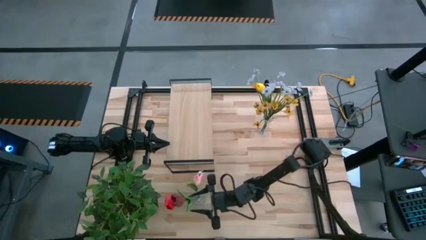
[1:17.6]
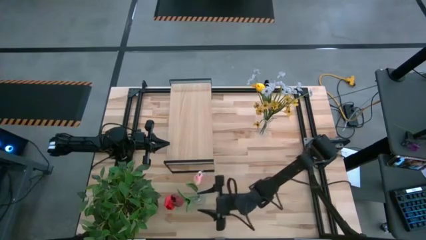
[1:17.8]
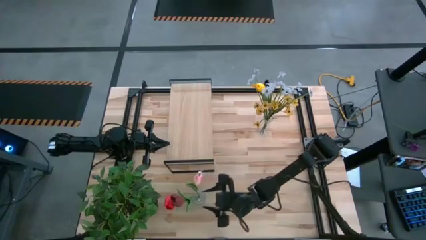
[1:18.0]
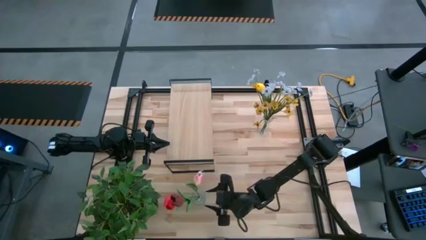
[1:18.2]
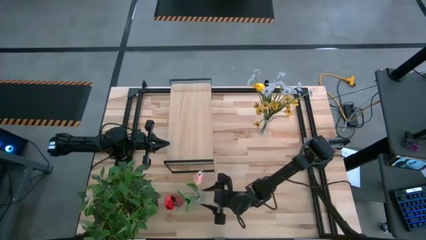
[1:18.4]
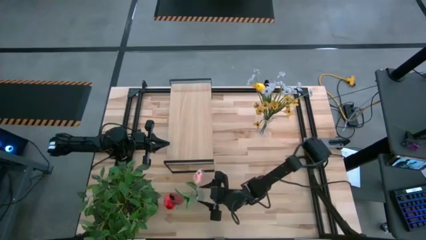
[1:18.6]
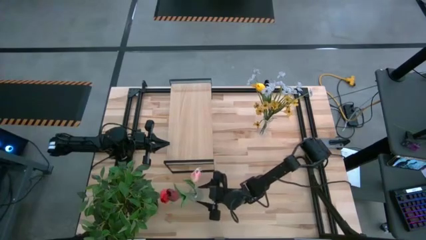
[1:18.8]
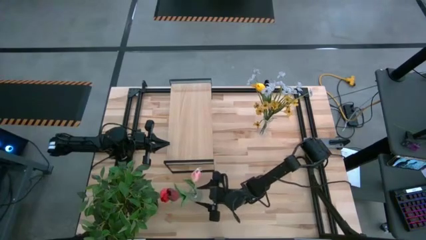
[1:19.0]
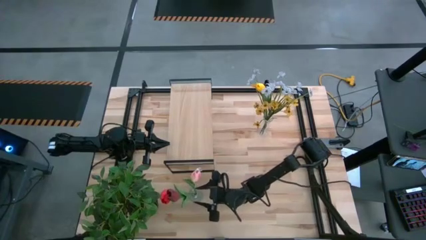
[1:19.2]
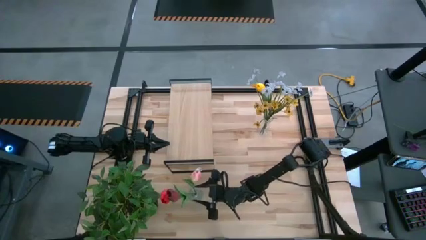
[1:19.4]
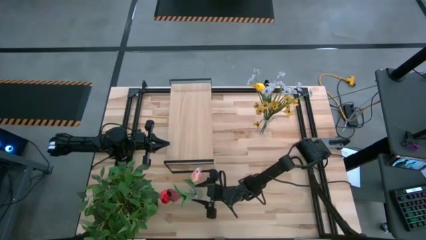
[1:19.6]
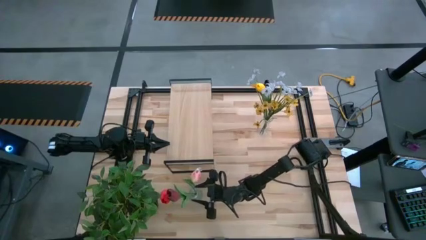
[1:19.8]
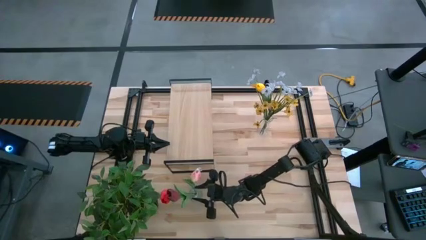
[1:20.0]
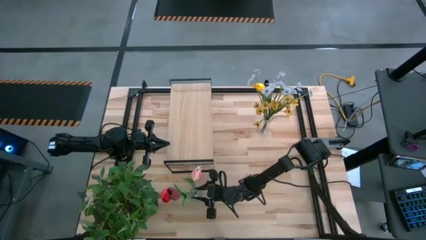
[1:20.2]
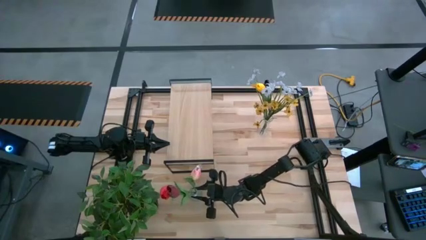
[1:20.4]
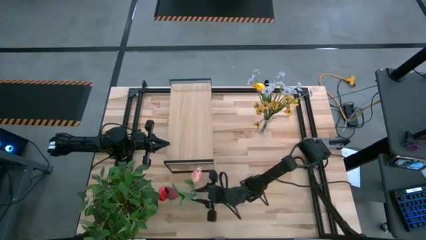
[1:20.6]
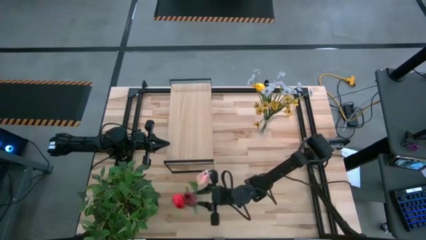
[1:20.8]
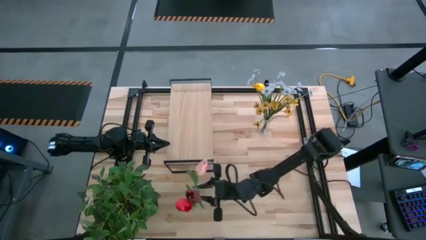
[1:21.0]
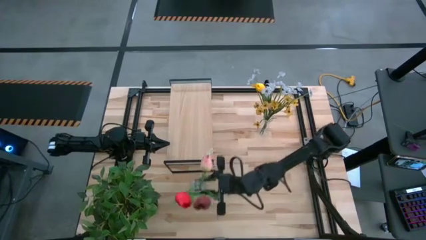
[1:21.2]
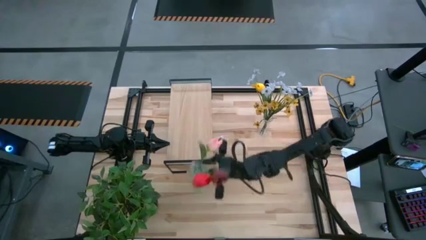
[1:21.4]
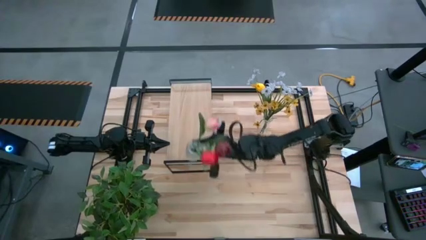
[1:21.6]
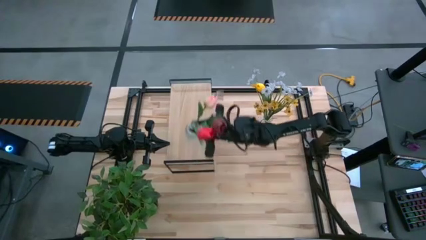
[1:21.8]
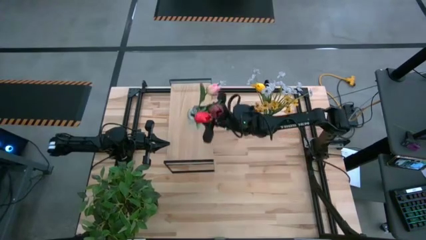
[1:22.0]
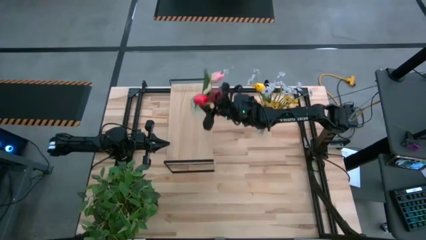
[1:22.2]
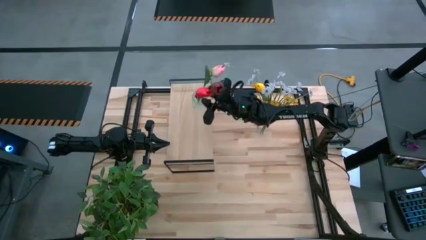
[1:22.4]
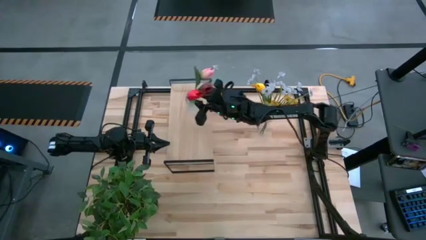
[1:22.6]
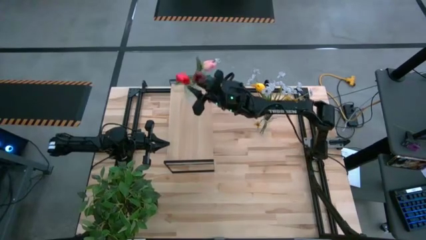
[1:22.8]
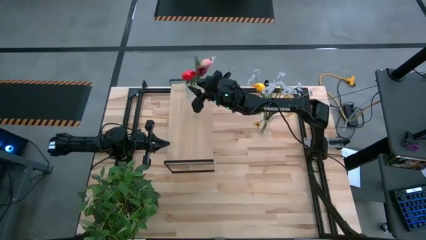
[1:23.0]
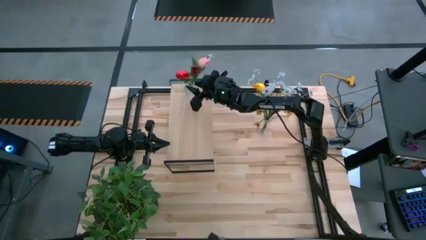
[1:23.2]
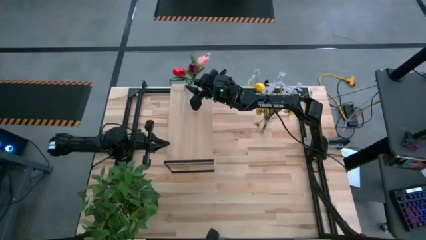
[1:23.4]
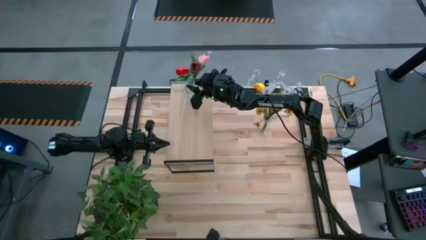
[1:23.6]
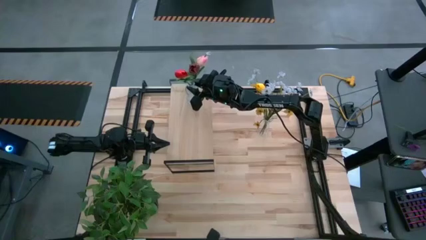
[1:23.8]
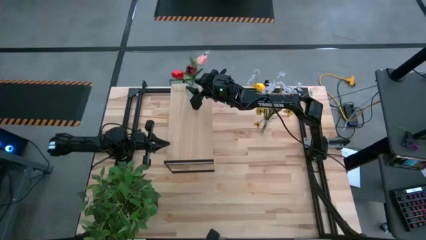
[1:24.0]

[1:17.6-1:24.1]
Task: Pick and place flowers into a vace then onto a shelf
Put the bottom transparent vase on the shelf

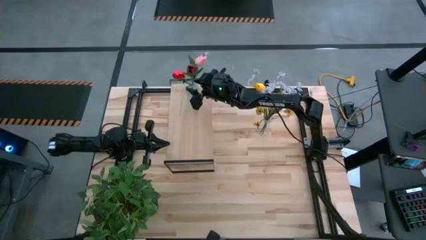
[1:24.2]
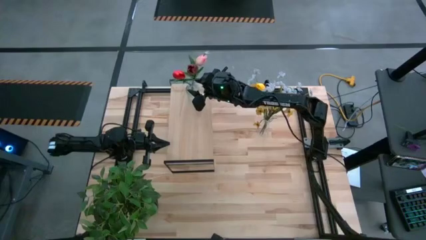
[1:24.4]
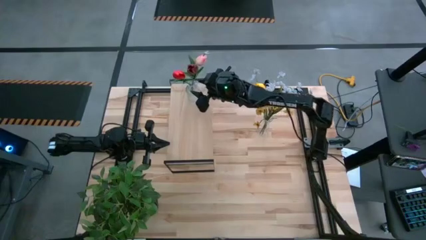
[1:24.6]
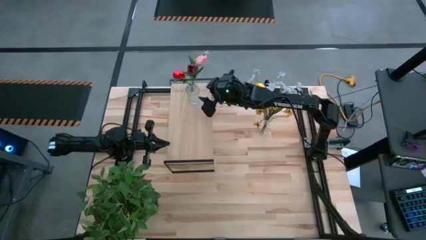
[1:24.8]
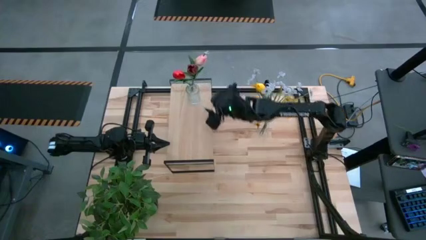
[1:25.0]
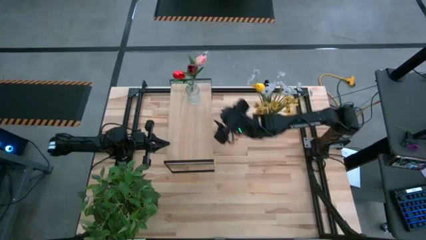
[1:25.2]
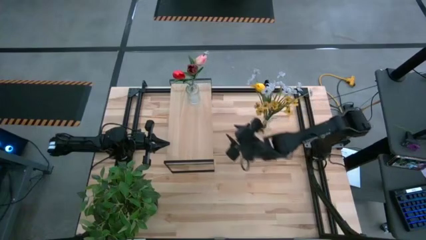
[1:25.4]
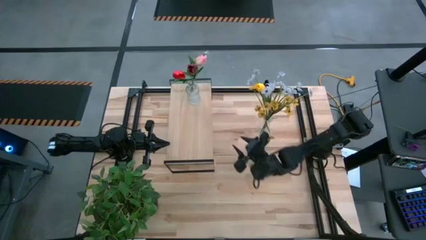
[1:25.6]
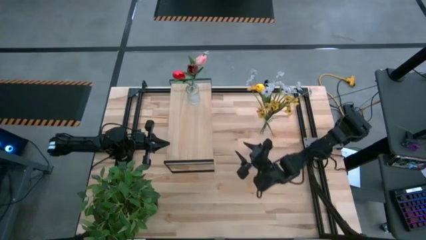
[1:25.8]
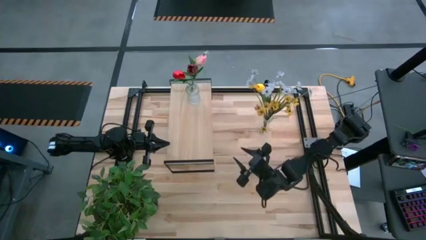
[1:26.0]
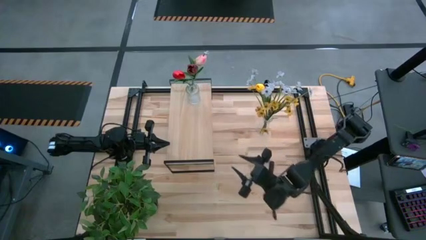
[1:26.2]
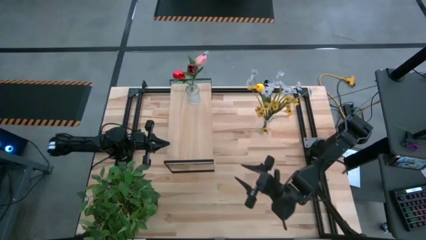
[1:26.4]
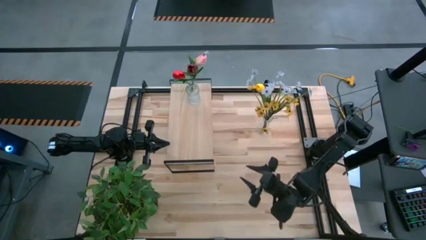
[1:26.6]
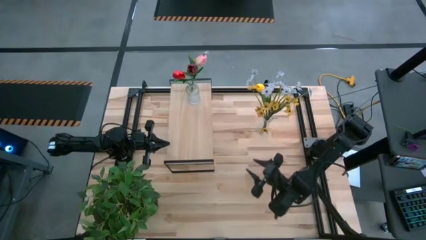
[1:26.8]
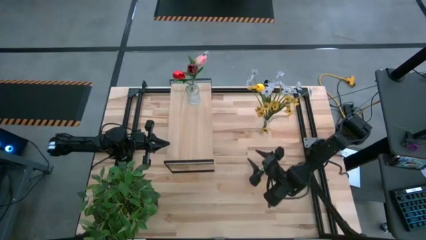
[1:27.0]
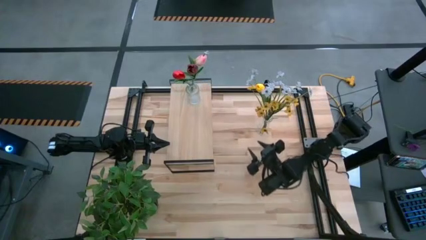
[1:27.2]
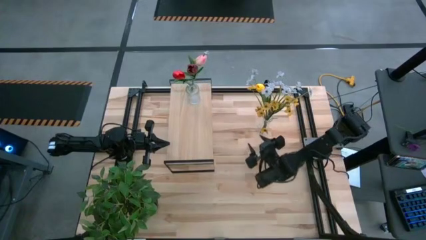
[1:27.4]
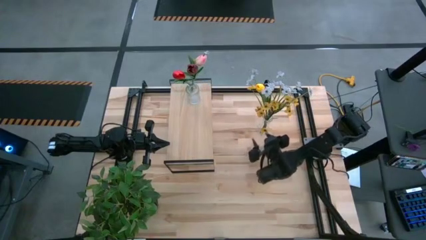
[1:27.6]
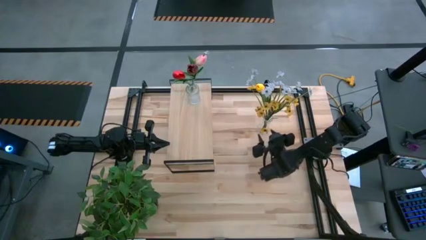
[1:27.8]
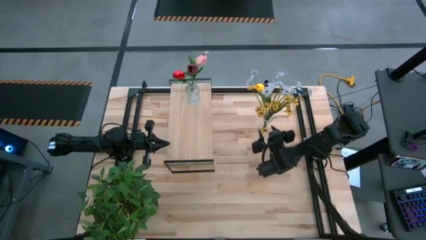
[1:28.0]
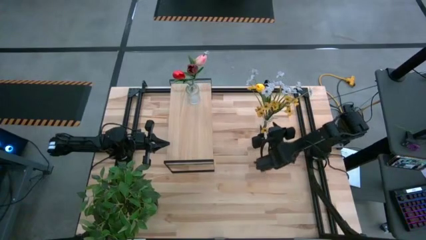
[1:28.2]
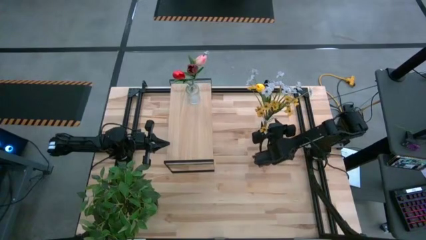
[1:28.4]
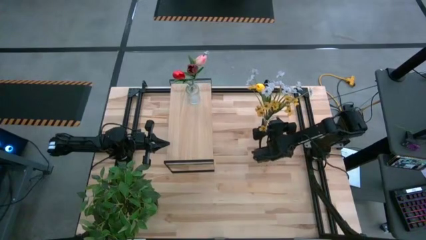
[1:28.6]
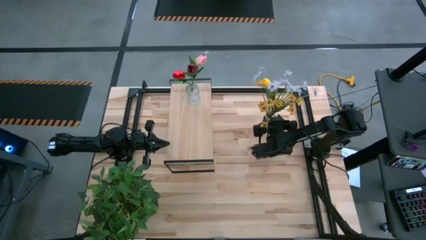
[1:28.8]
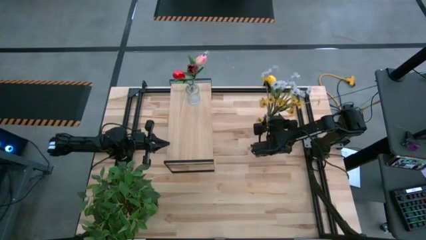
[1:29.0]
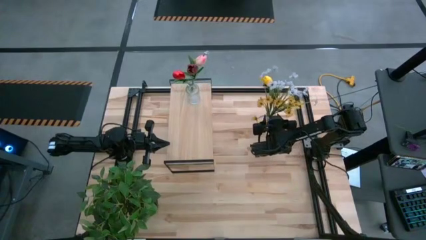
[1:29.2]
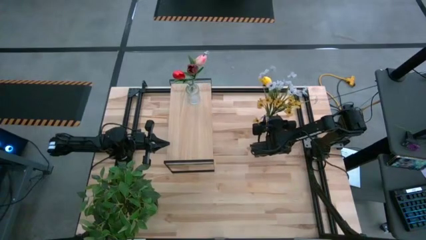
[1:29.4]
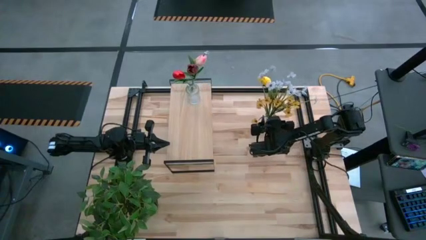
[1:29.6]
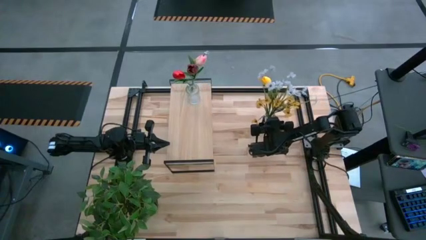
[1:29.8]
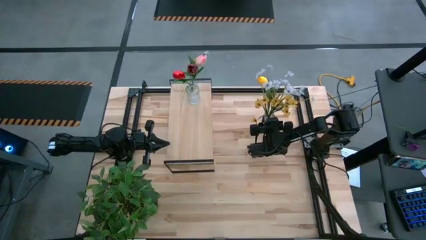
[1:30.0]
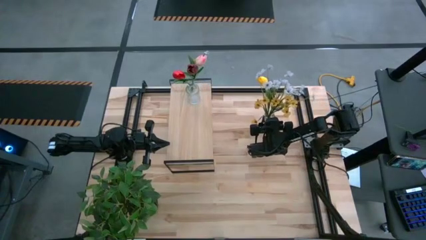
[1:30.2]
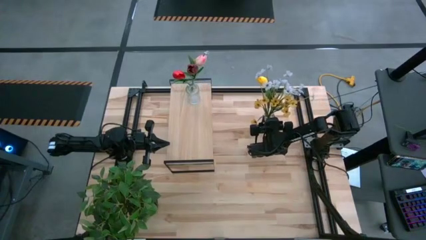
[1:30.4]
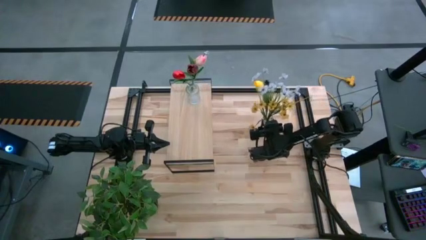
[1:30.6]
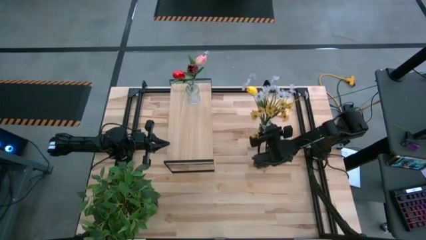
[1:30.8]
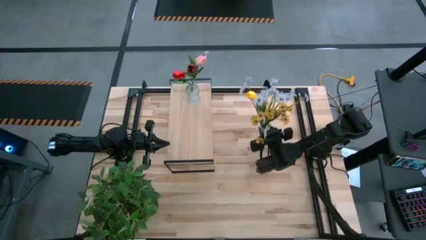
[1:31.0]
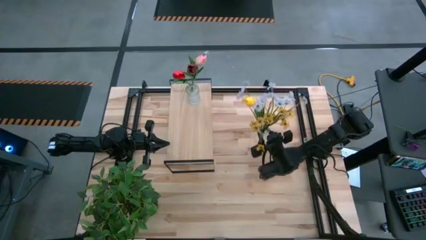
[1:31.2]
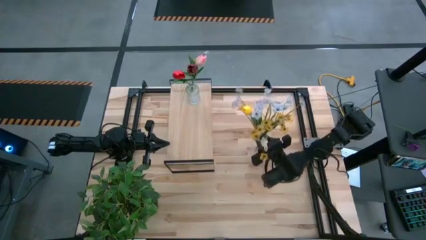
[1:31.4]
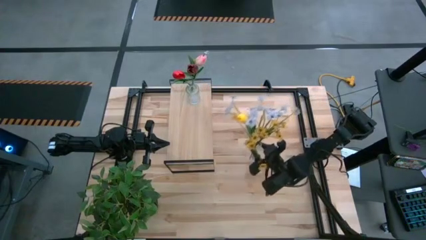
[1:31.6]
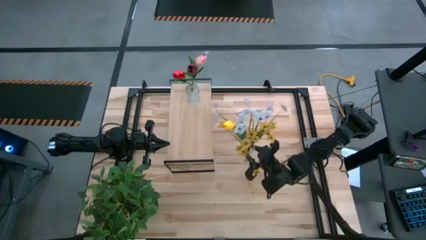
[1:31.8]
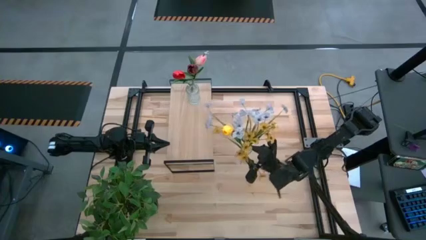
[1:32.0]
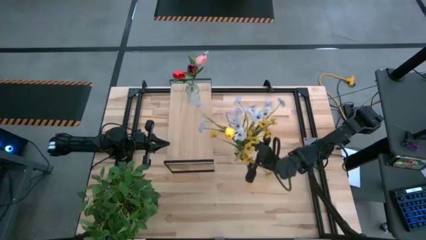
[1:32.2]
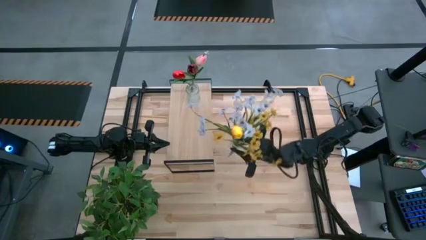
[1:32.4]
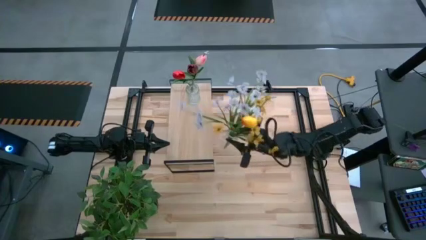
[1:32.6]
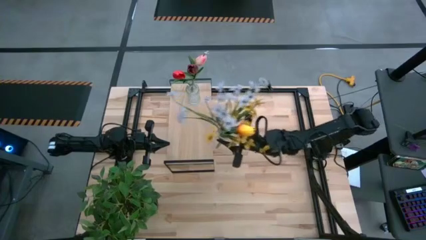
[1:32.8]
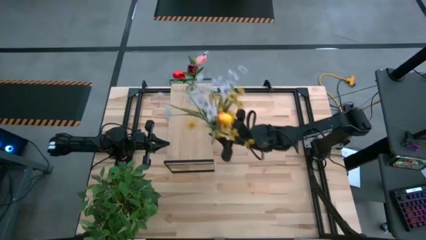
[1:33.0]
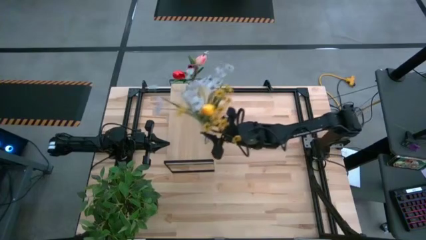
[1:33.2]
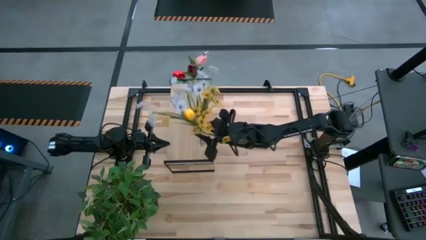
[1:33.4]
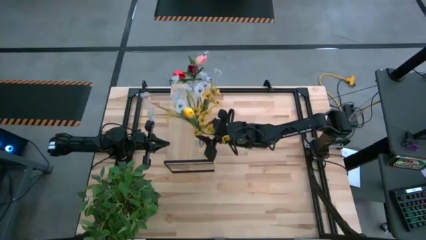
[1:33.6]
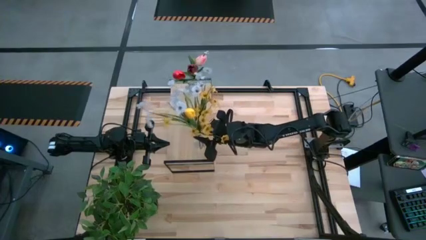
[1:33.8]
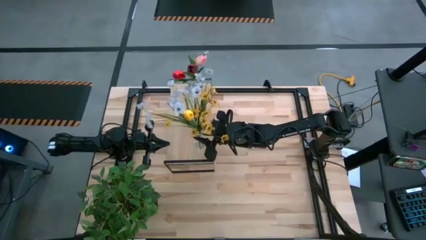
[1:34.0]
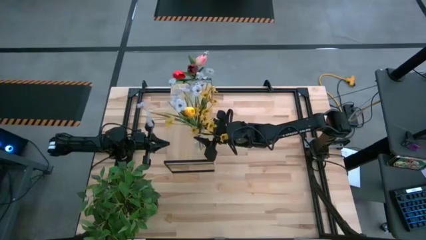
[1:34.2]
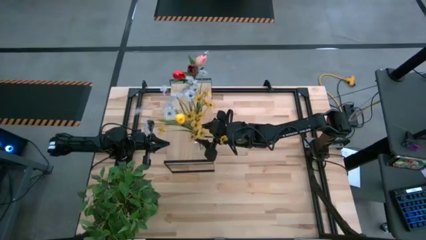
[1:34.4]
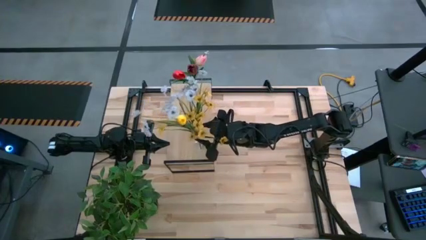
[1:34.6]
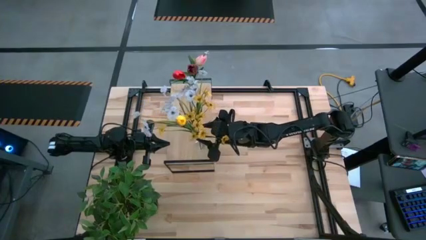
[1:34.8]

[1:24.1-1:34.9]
Put the top transparent vase on the shelf
